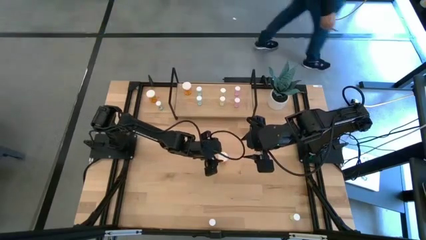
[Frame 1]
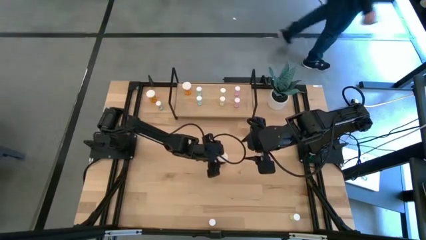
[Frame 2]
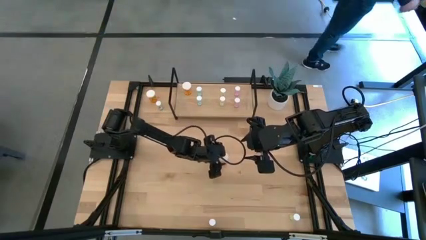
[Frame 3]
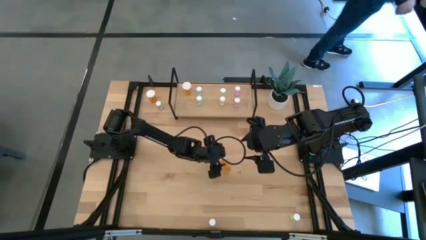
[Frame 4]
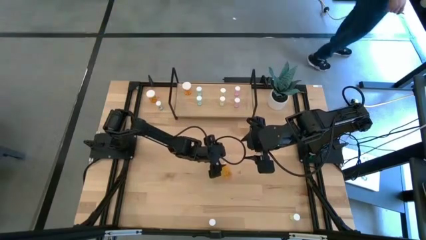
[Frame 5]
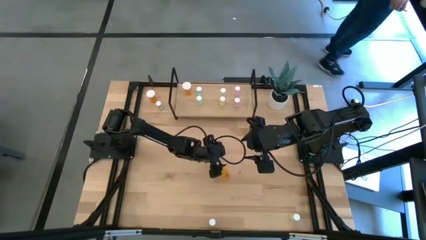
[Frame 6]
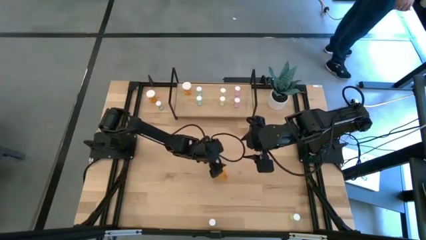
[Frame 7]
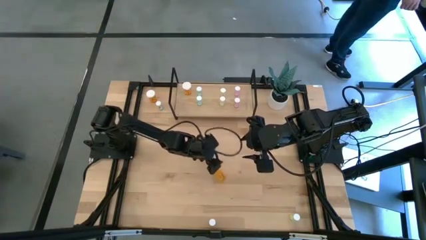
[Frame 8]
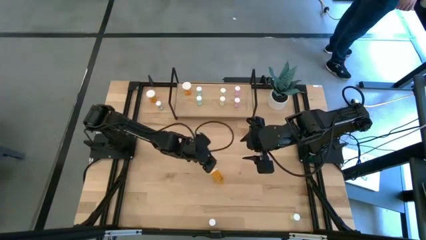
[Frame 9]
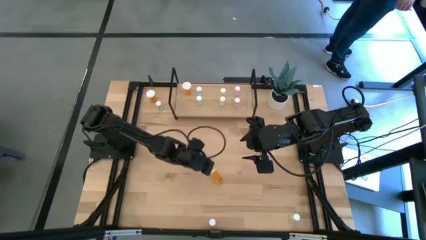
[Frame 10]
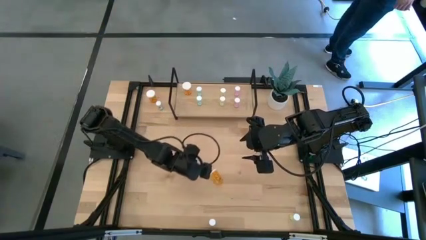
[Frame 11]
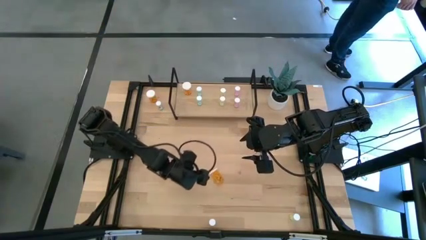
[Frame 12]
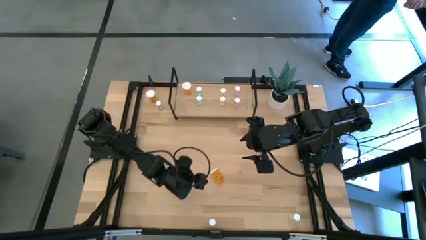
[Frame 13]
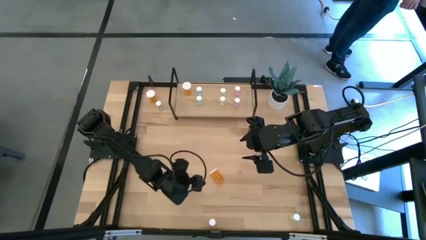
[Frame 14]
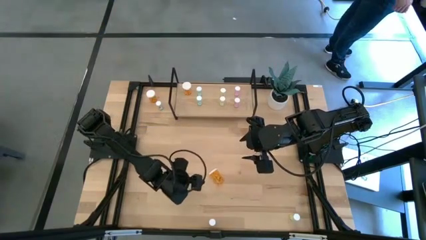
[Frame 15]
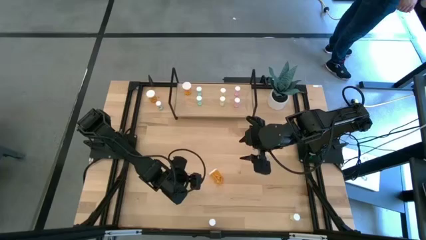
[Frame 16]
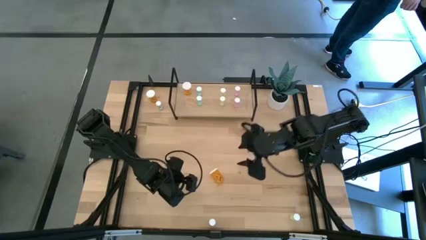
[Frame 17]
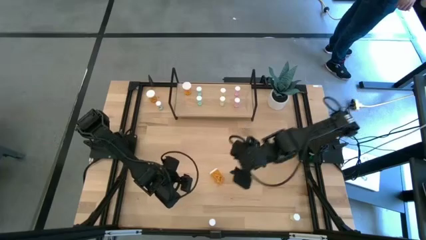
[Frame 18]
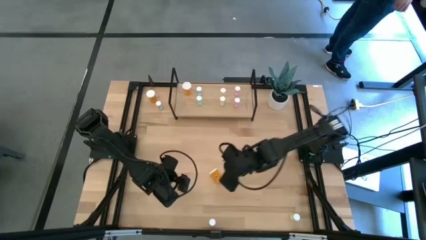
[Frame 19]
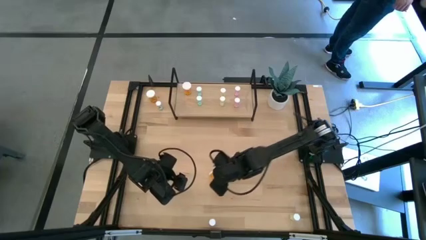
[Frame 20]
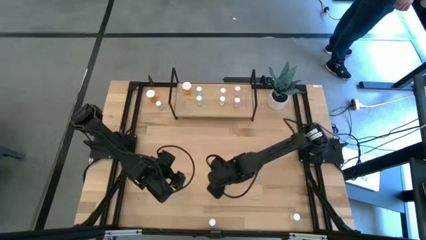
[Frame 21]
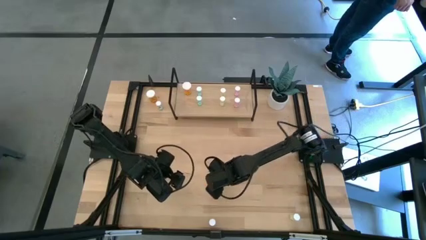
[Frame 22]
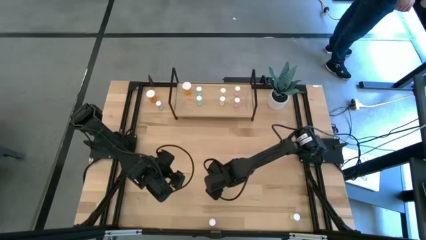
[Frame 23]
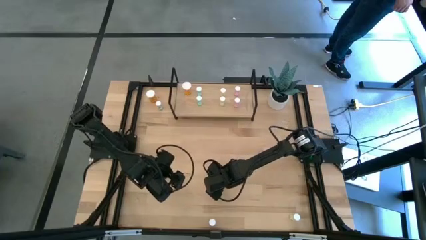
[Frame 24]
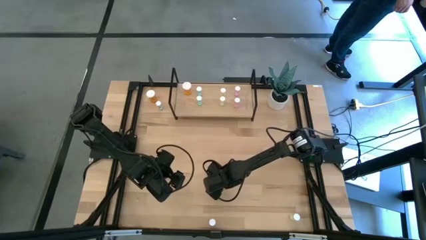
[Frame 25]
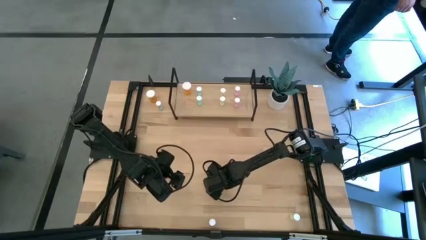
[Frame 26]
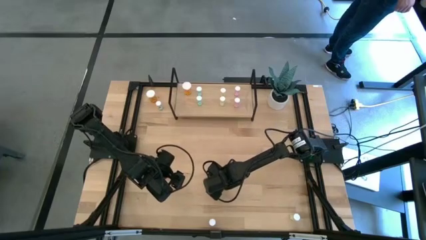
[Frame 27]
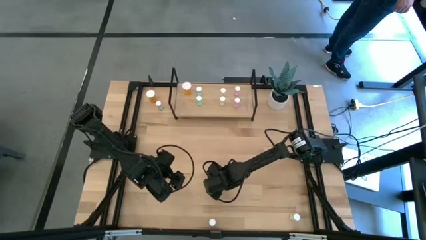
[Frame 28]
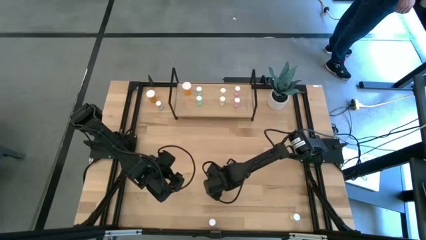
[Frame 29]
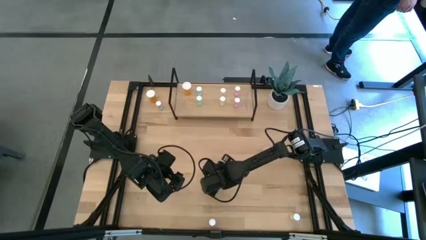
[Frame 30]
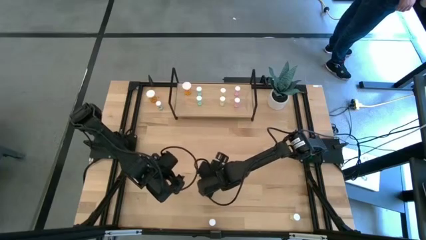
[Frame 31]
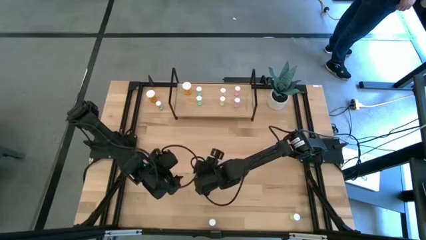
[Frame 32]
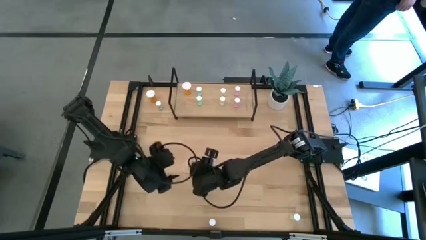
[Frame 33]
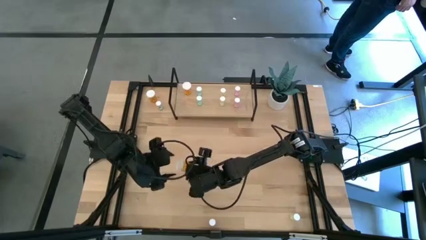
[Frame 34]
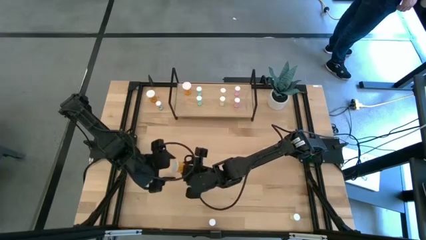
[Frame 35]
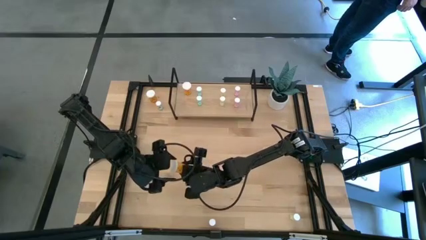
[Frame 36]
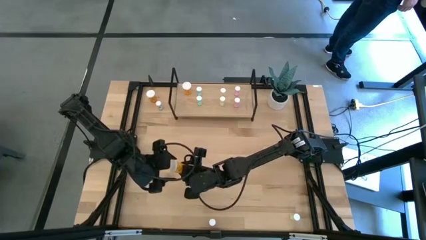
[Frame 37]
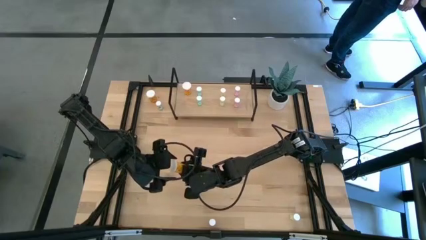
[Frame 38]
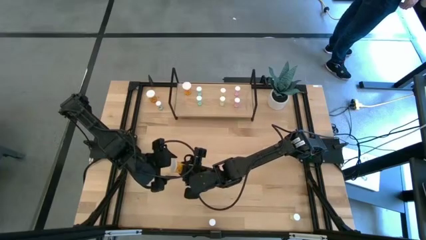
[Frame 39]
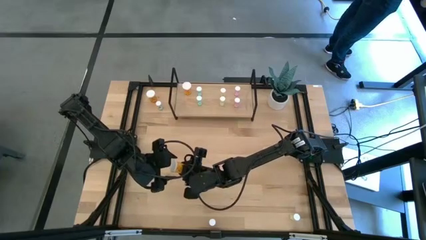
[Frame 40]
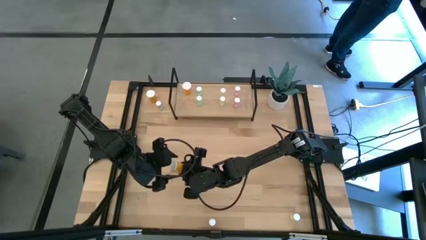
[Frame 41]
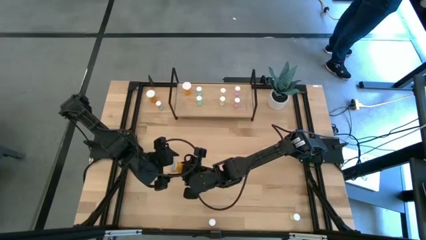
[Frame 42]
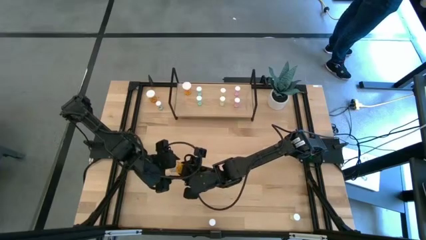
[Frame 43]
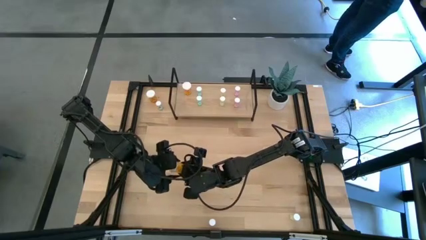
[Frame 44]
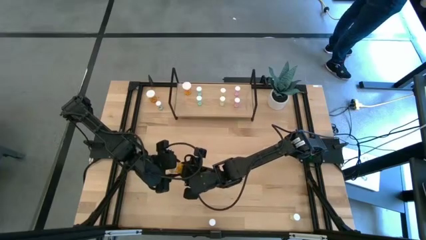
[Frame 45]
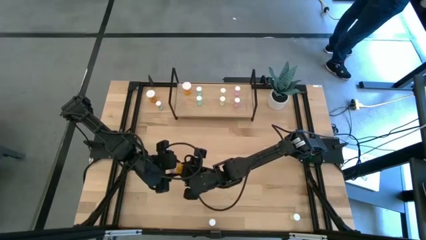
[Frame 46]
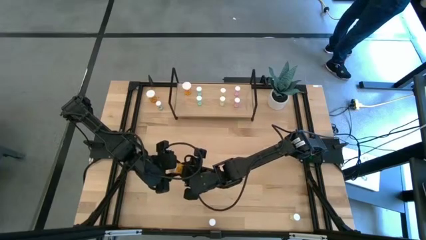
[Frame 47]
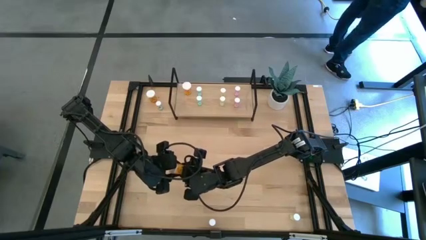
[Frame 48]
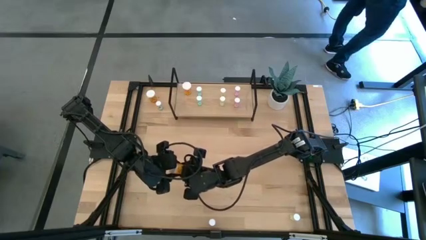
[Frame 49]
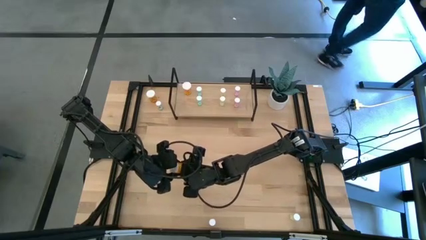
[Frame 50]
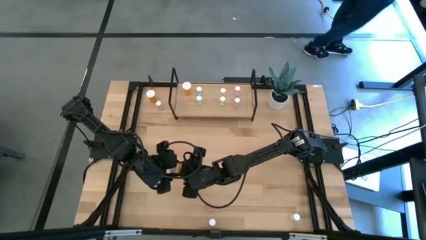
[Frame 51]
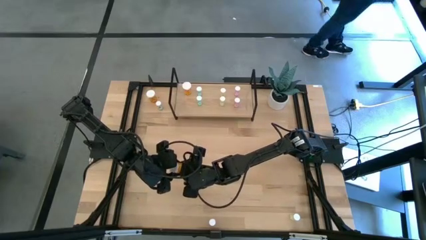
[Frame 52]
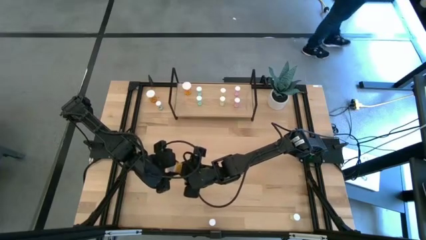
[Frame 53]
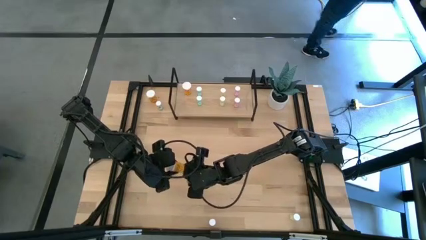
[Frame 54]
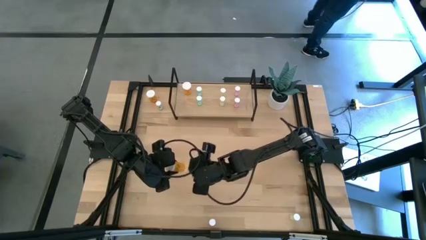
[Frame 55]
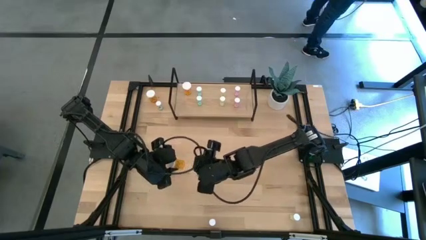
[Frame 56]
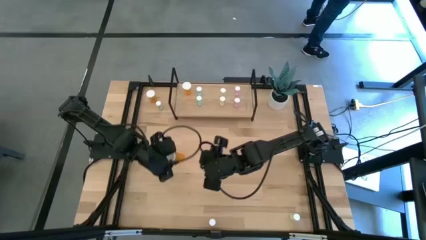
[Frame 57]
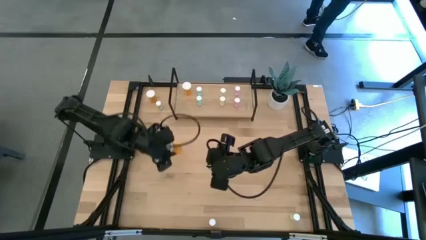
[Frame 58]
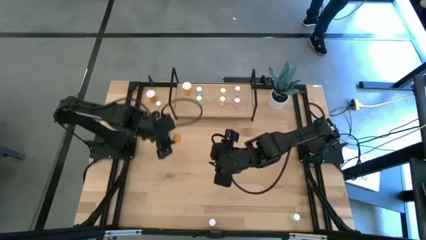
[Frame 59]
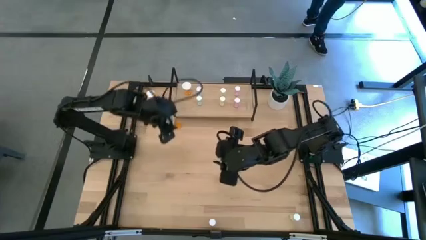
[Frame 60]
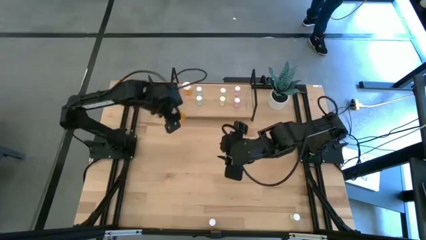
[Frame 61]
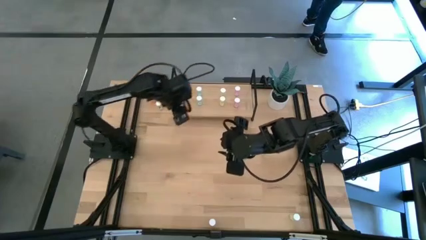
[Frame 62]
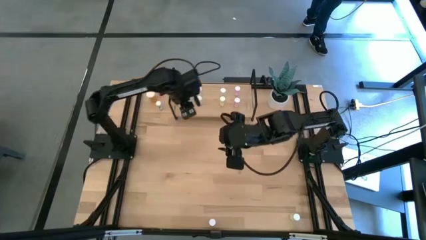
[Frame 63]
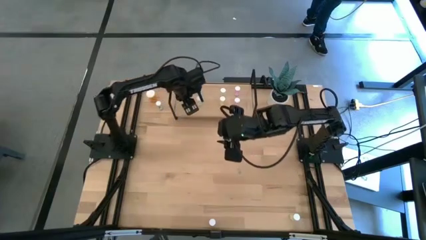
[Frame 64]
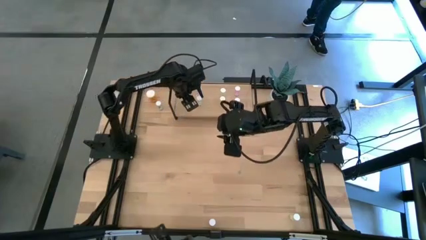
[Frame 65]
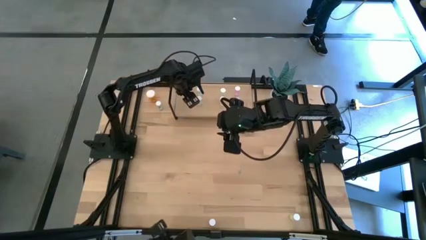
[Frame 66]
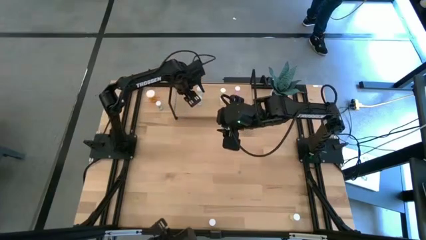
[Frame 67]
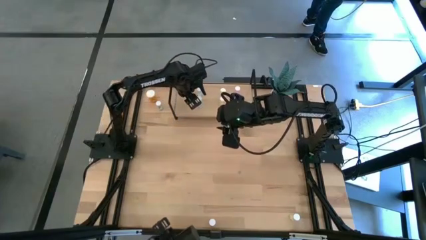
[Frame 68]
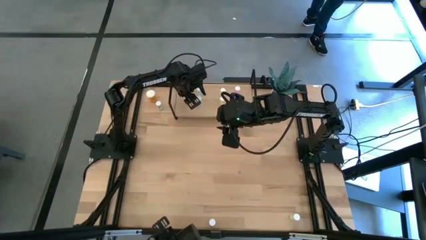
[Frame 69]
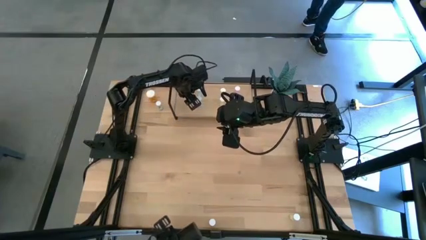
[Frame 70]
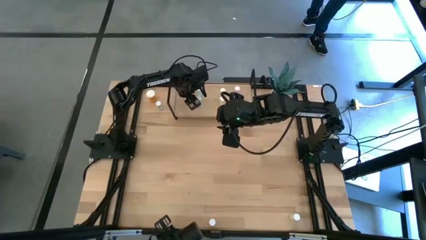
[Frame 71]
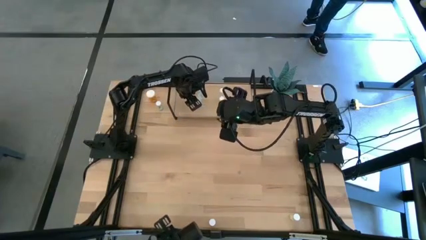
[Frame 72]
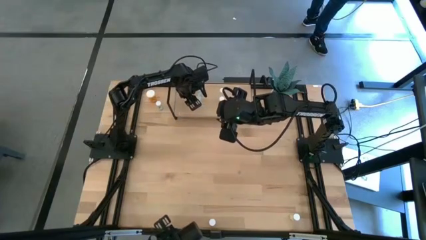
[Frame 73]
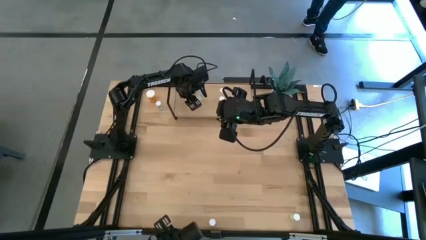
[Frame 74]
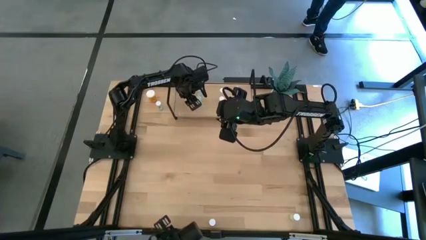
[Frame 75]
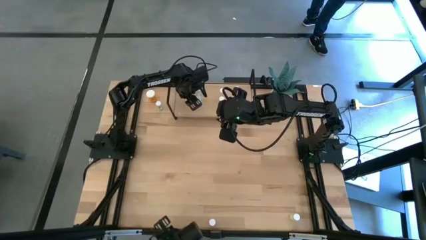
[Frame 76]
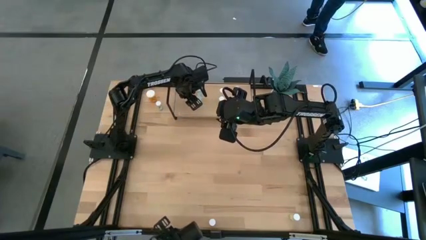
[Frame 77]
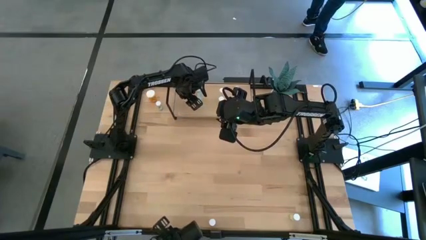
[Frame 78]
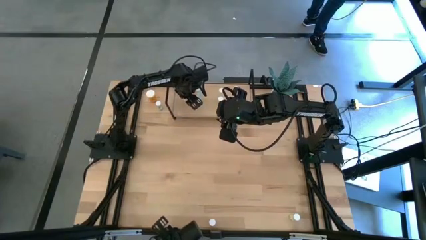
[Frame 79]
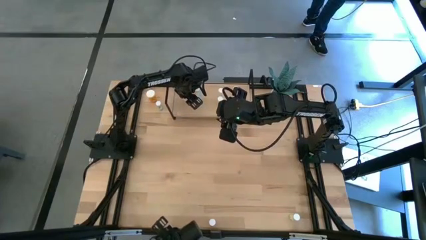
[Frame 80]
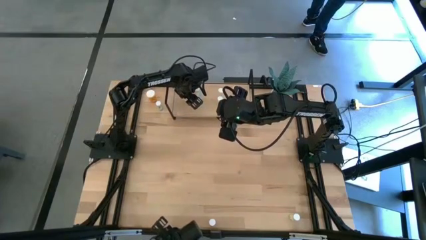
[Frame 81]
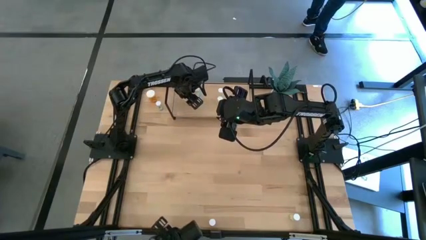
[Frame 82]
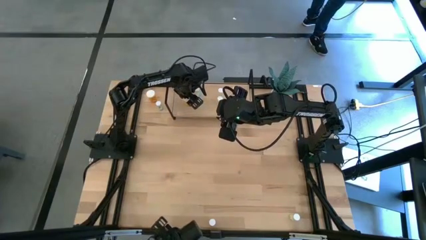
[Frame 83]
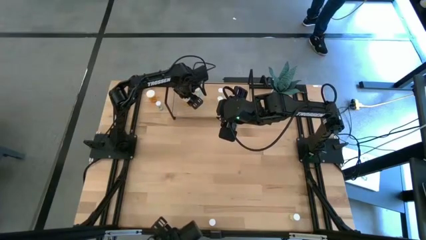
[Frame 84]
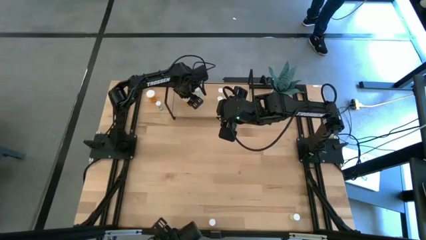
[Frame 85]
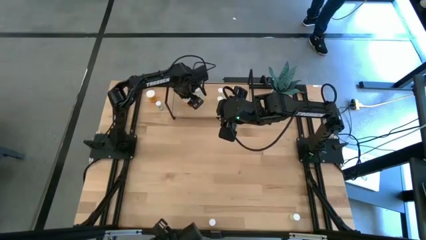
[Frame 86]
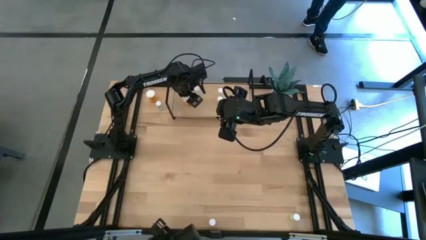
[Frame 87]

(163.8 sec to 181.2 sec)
Task: Pick and place medicine bottles onto shelf by color
Put the right orange pill bottle on the shelf aligned with the other orange pill bottle
